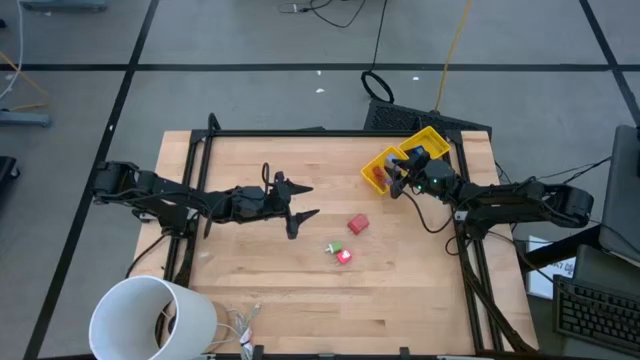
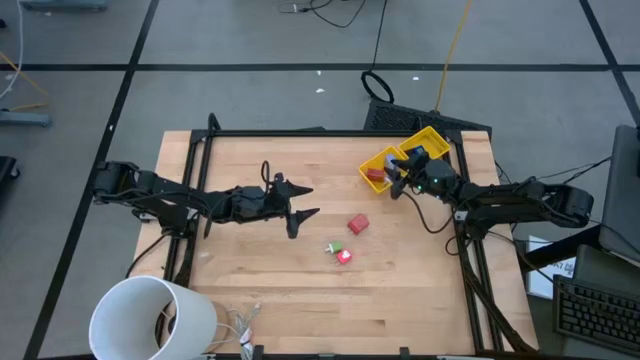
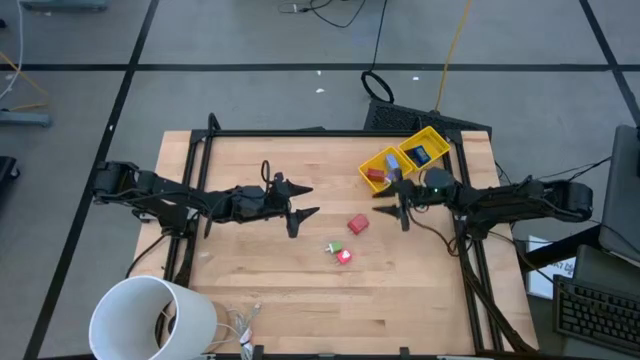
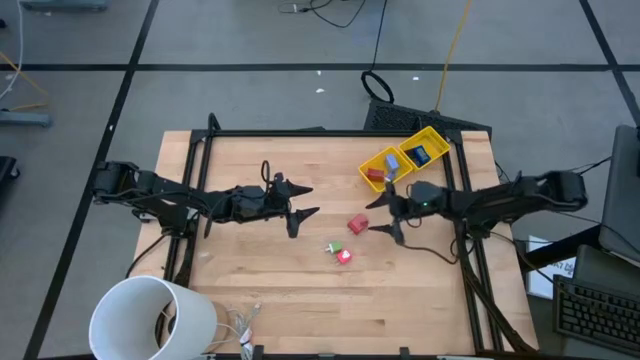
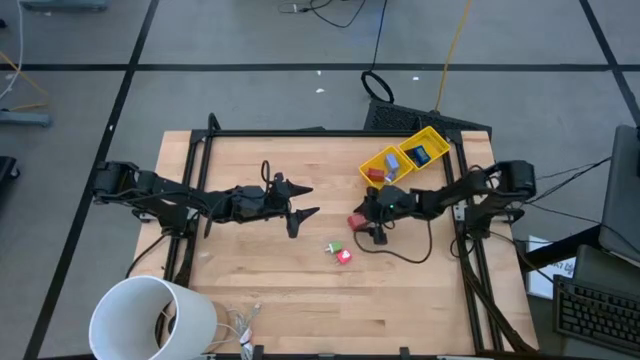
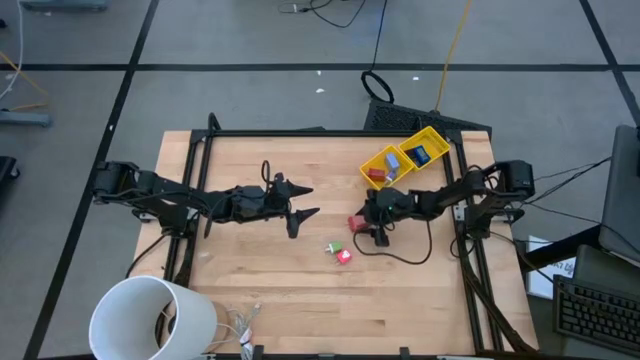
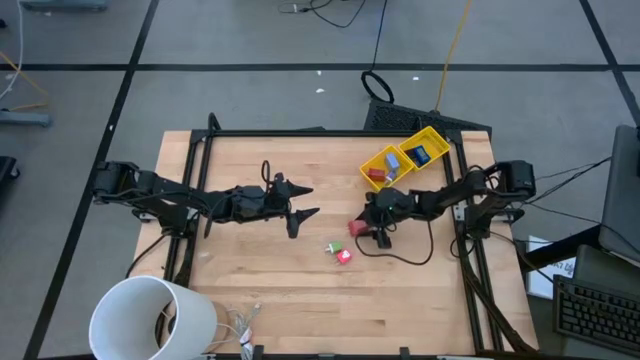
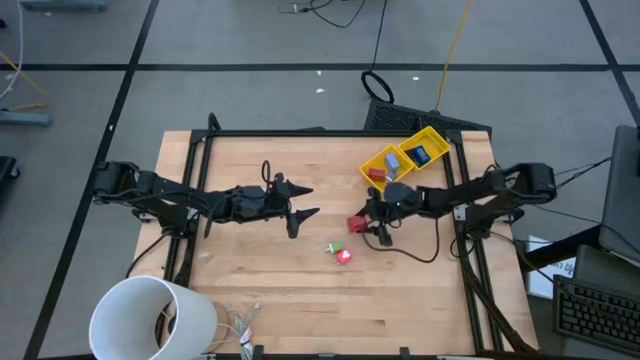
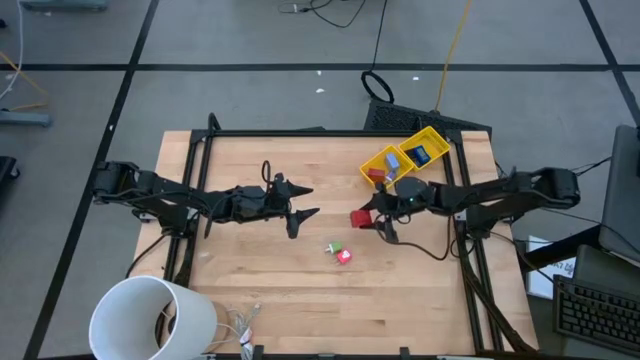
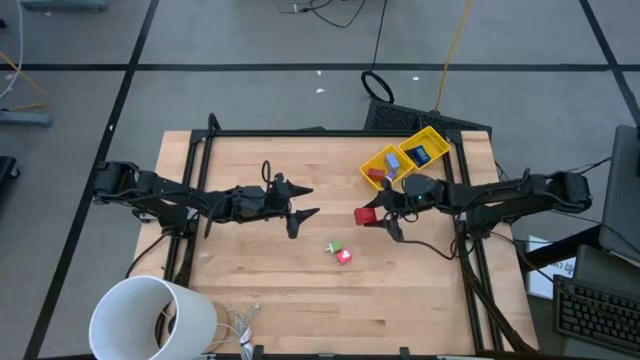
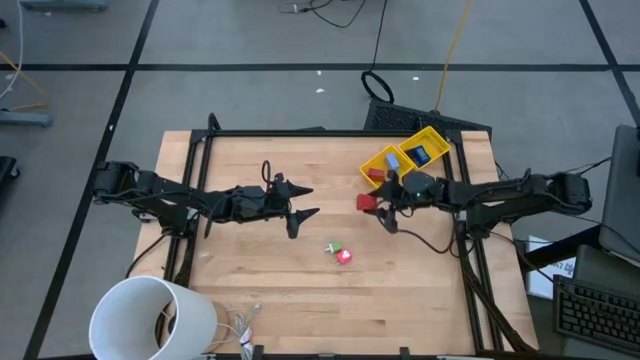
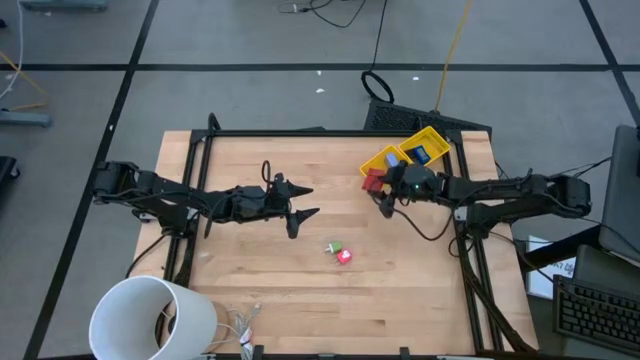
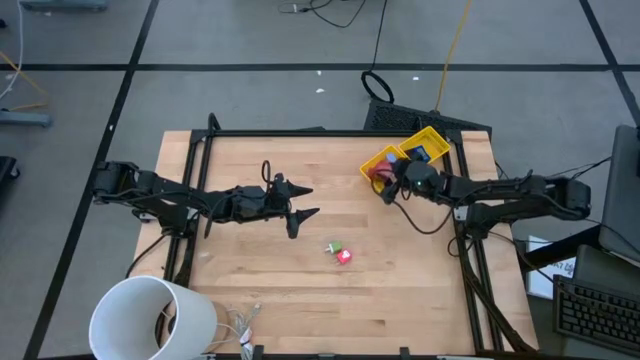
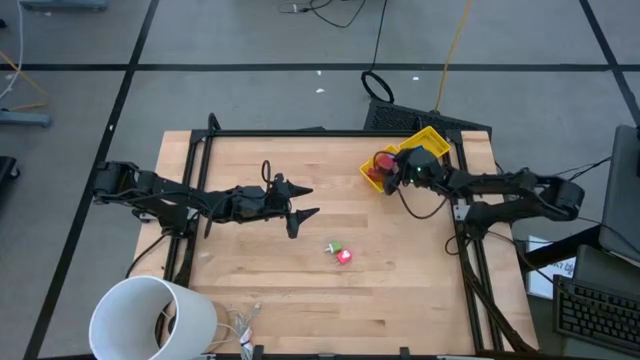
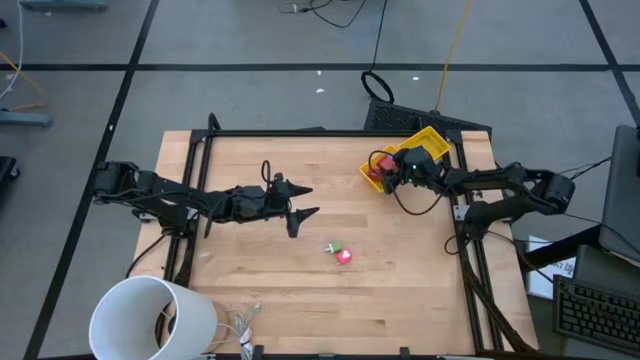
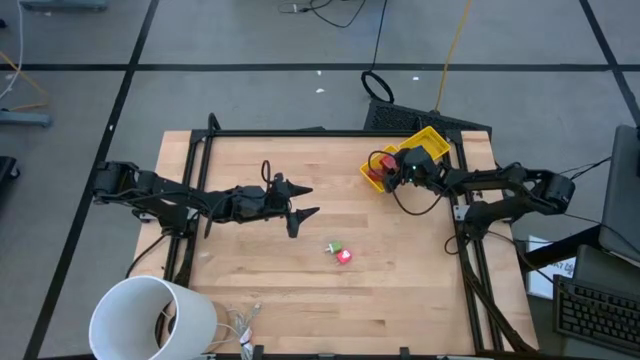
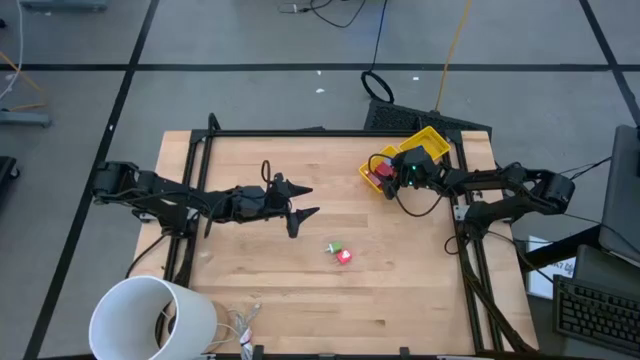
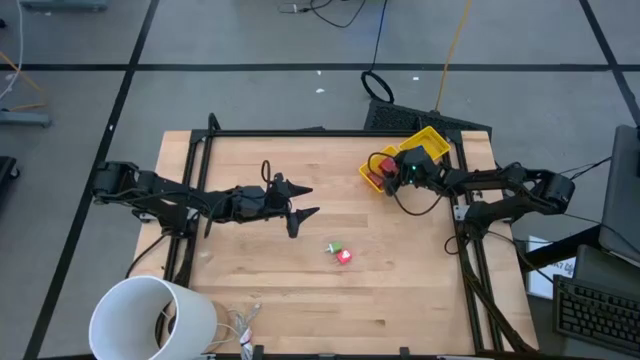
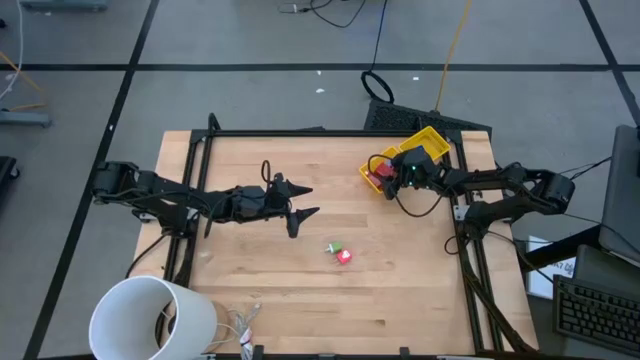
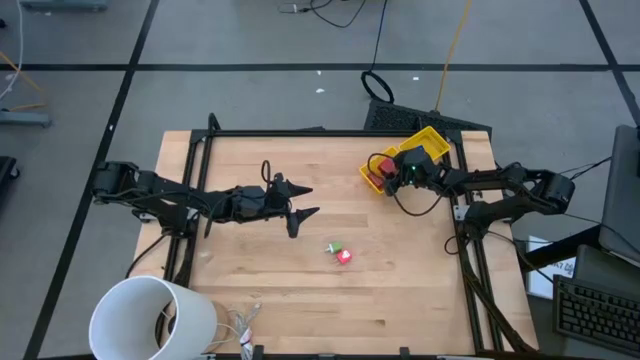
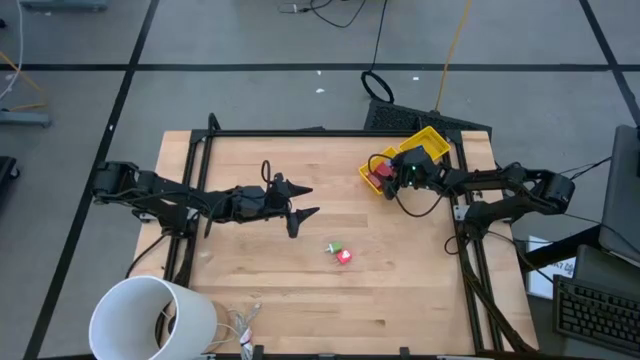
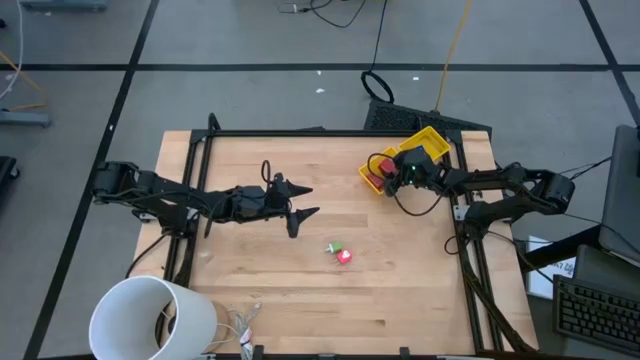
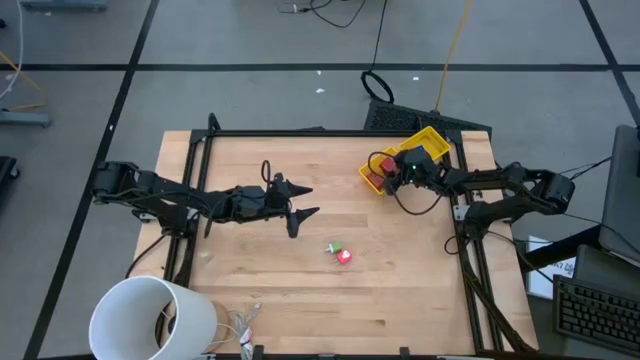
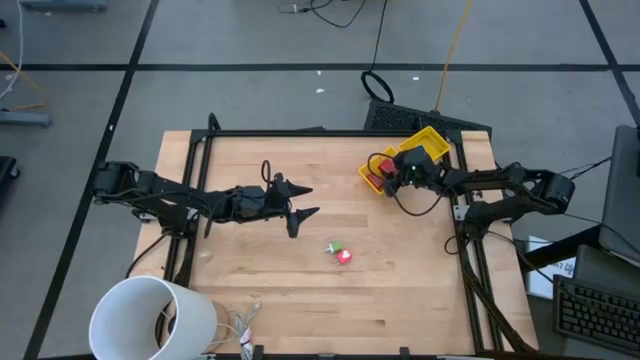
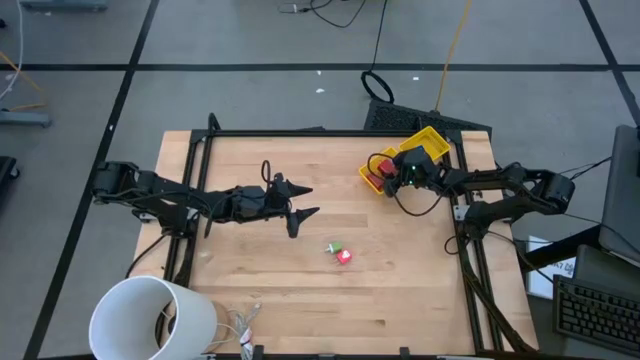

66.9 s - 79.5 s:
Task: Pick & Place Office items
Put the red charger adapter into the left yellow bin

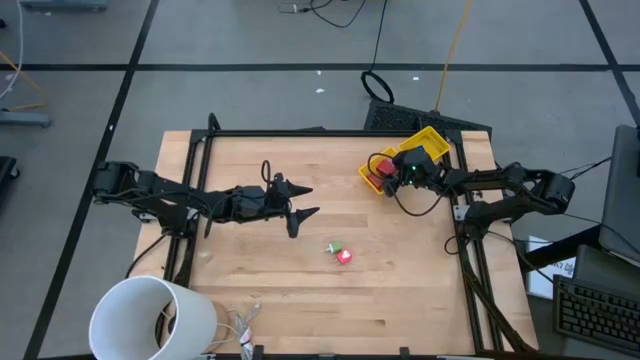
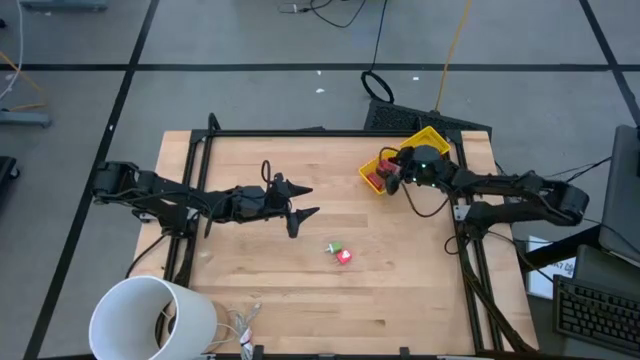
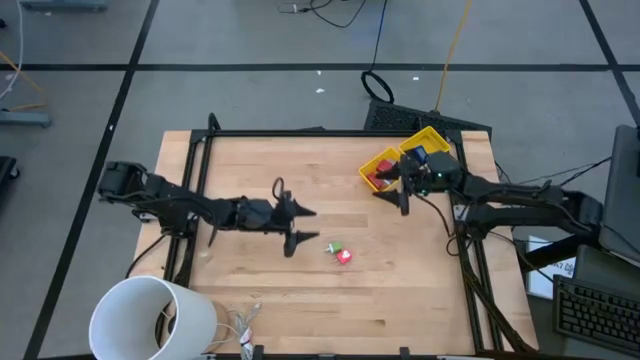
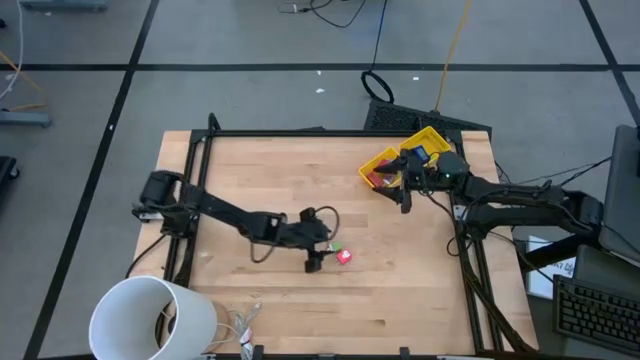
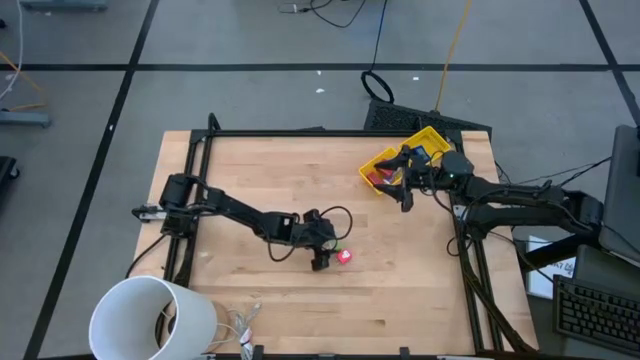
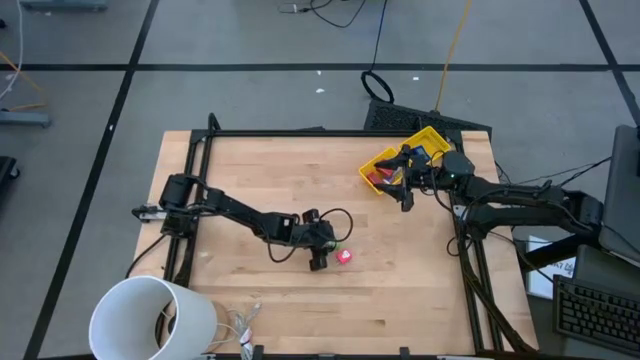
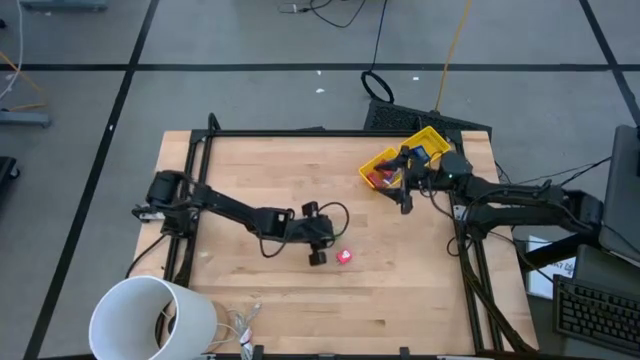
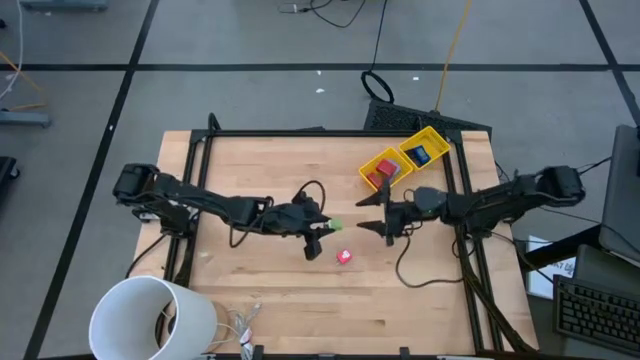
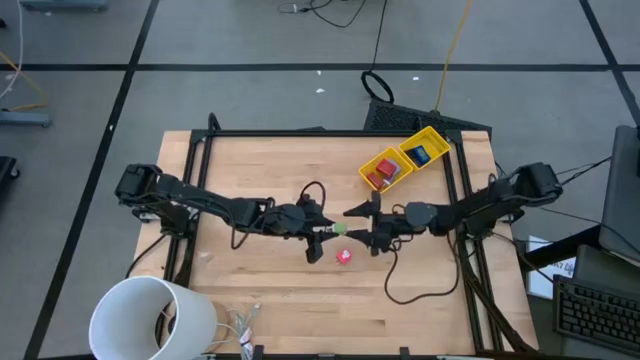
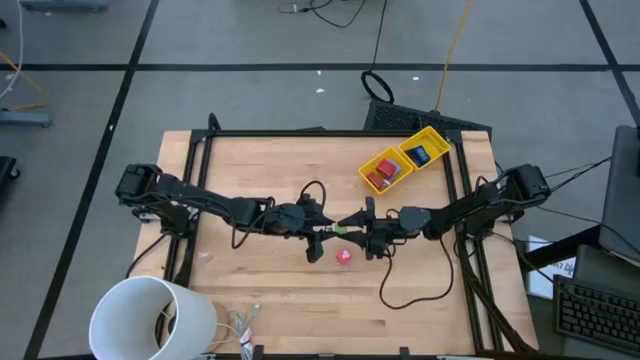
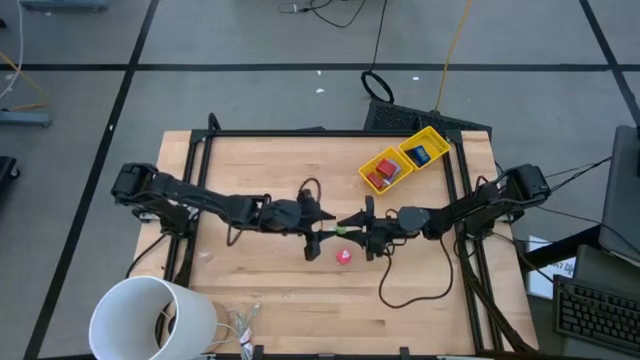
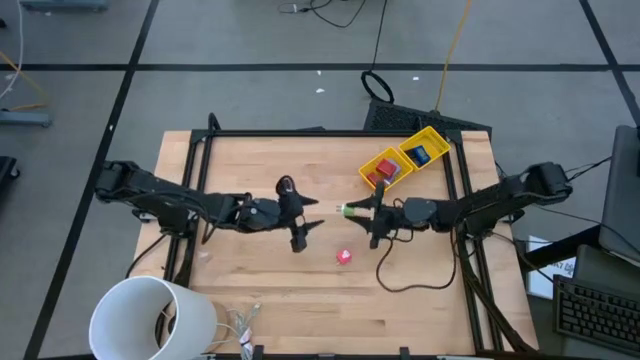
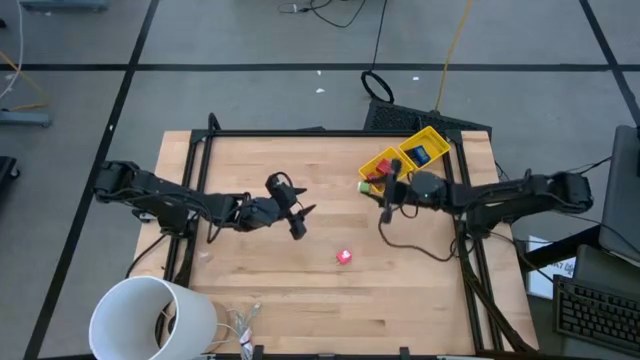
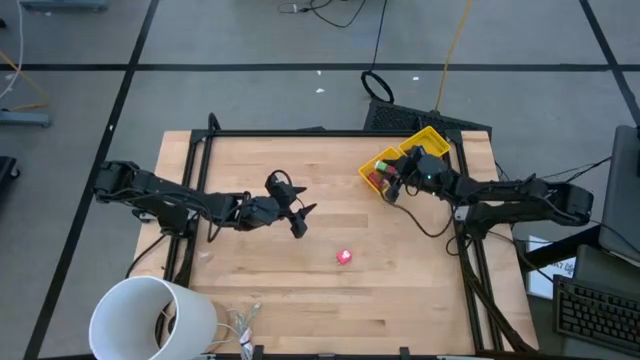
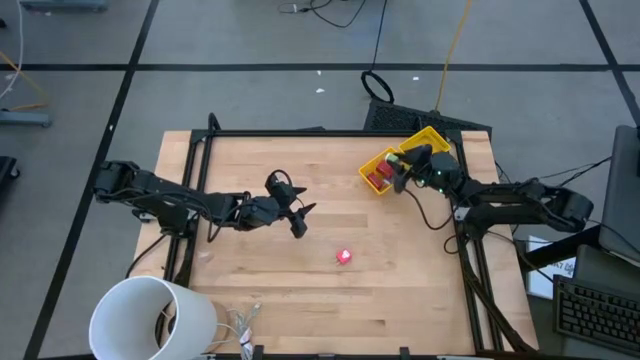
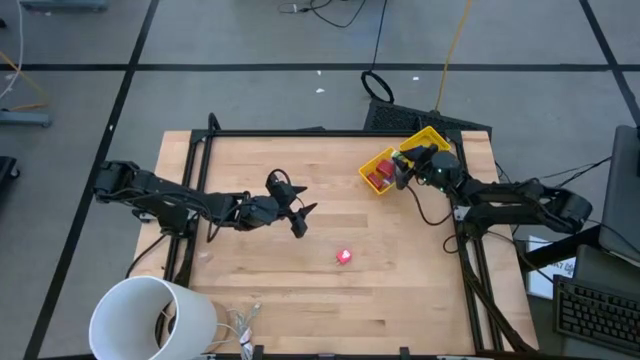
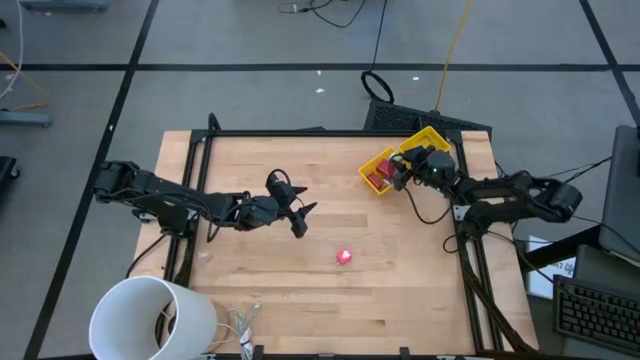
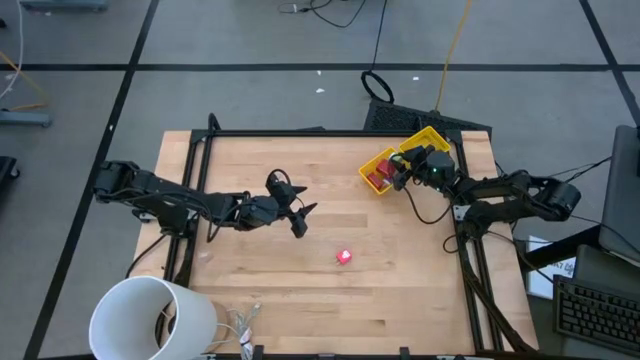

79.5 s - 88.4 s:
Put the green charger adapter into the left yellow bin

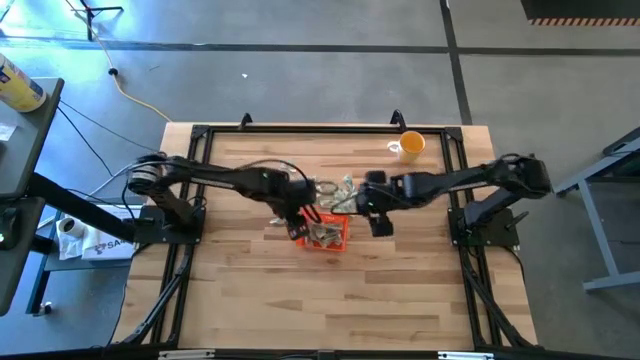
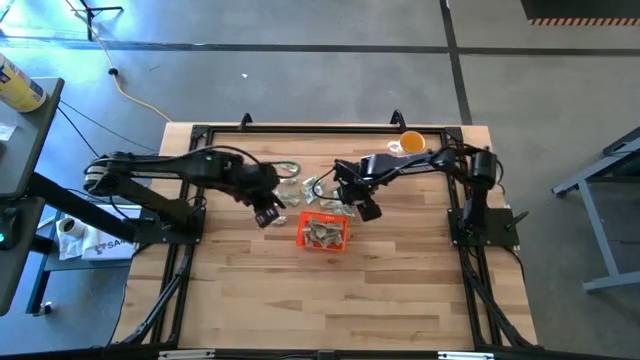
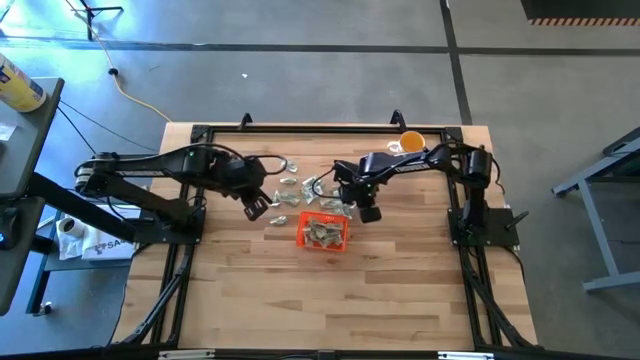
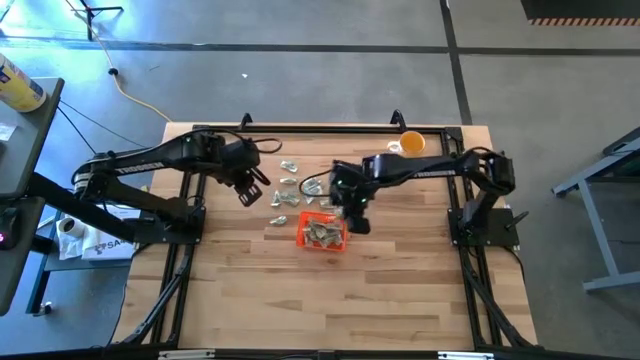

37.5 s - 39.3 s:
Task: Pick and place Stevia / Truvia into bins
Put the stevia packet into the orange bin

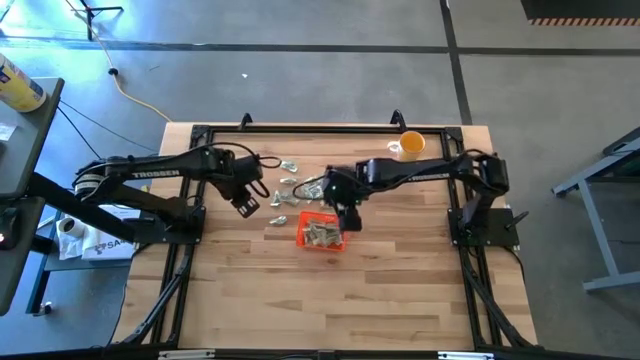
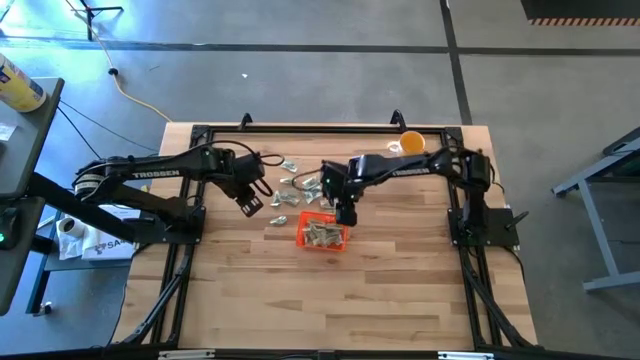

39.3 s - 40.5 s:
Adjust the orange basket
